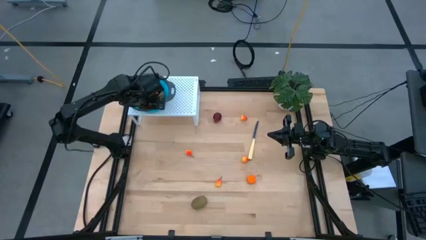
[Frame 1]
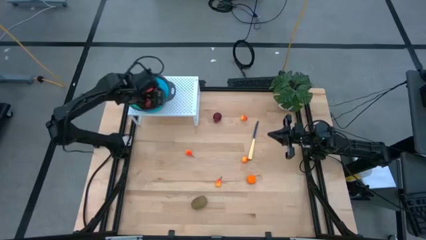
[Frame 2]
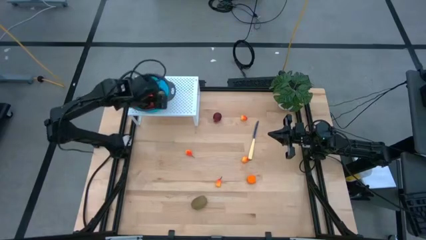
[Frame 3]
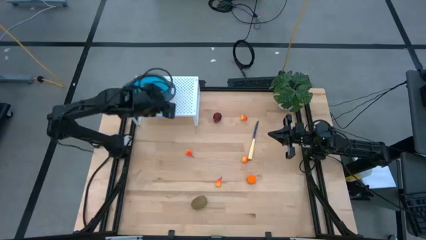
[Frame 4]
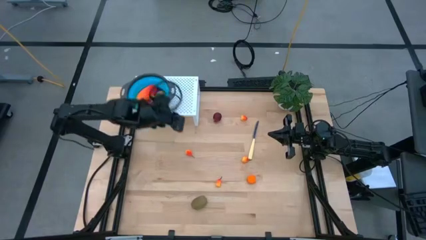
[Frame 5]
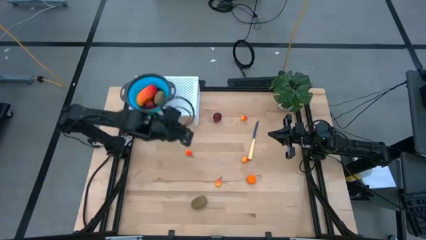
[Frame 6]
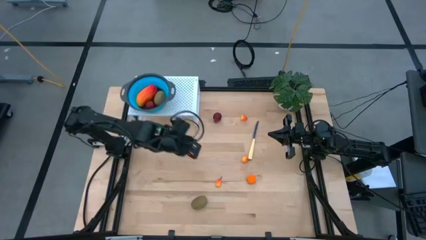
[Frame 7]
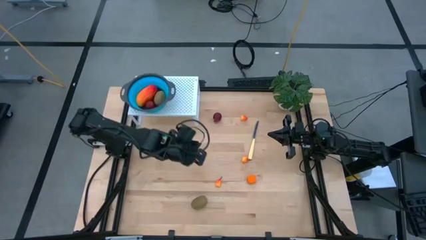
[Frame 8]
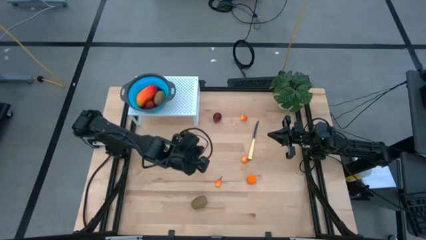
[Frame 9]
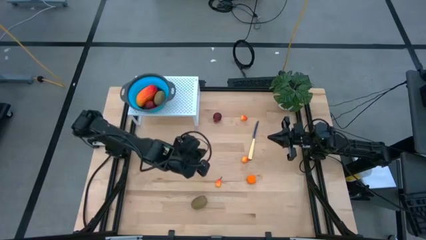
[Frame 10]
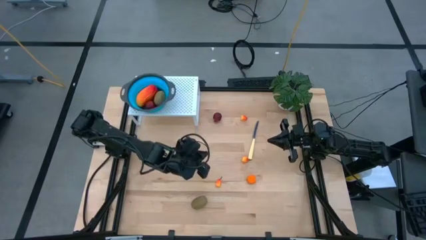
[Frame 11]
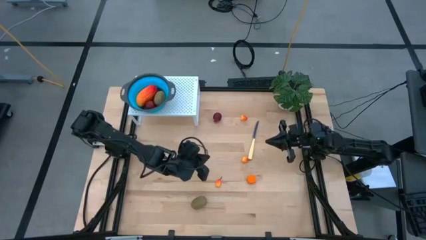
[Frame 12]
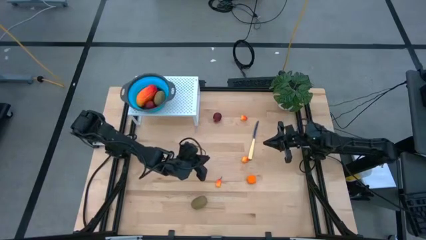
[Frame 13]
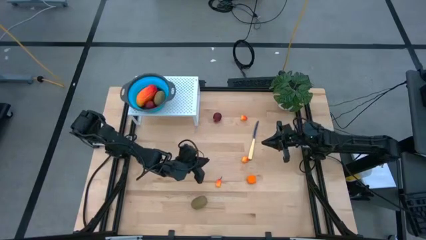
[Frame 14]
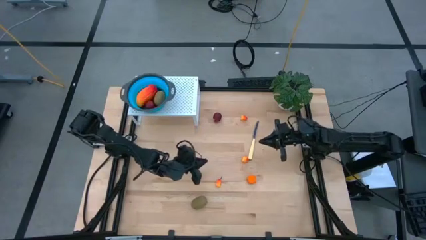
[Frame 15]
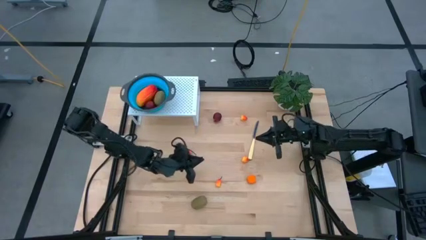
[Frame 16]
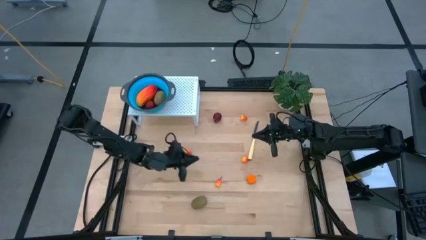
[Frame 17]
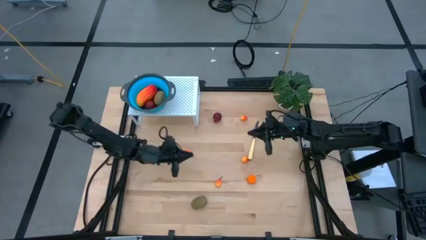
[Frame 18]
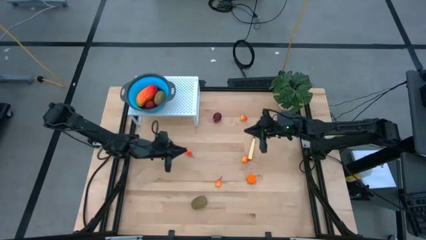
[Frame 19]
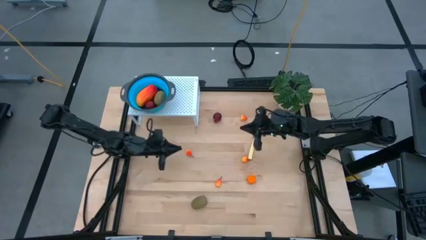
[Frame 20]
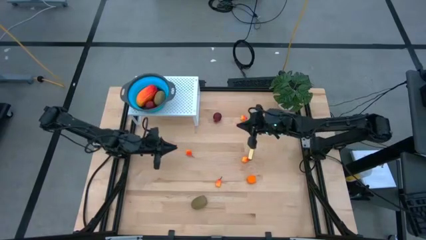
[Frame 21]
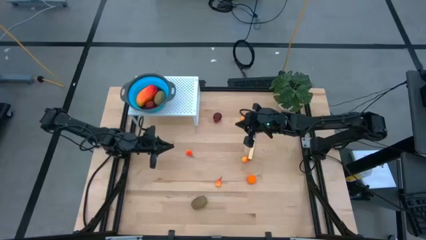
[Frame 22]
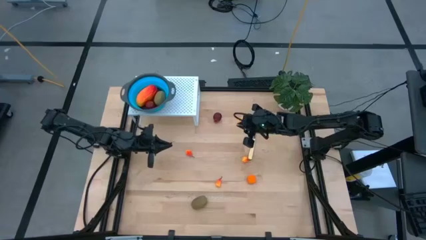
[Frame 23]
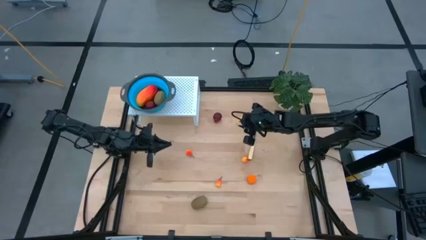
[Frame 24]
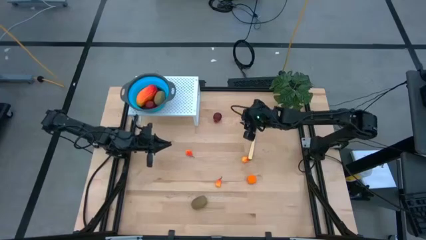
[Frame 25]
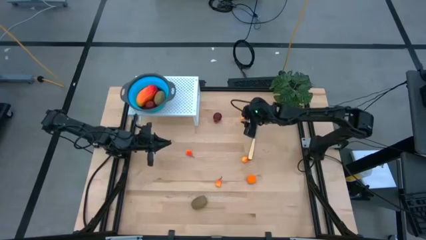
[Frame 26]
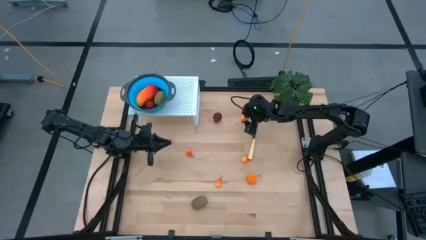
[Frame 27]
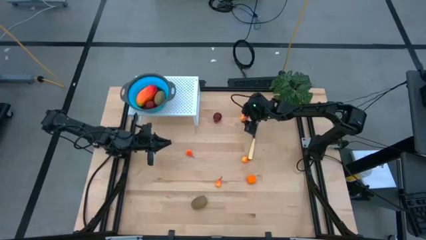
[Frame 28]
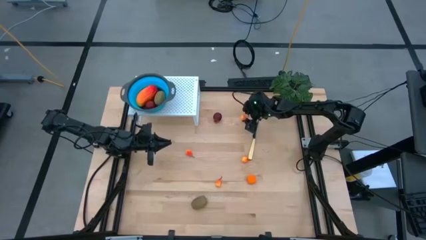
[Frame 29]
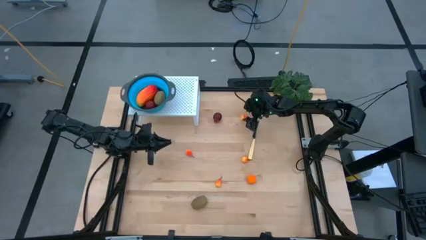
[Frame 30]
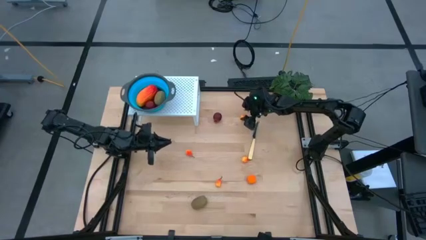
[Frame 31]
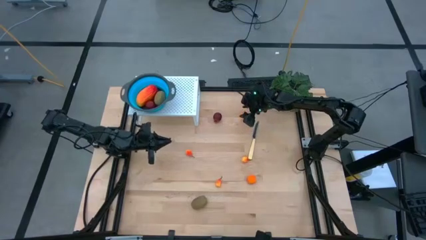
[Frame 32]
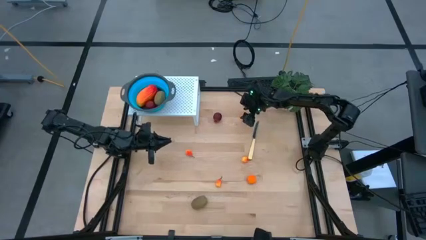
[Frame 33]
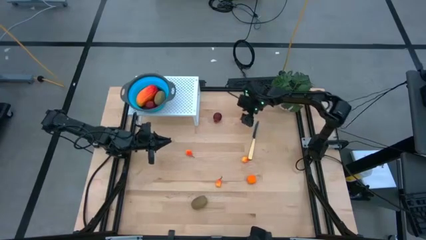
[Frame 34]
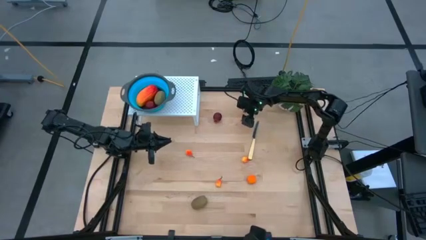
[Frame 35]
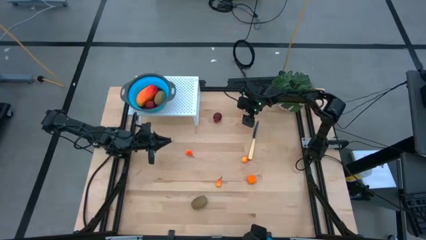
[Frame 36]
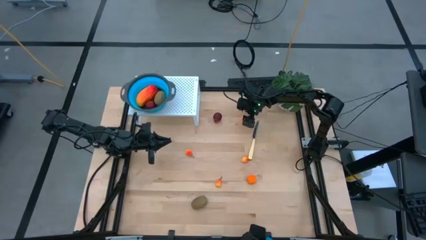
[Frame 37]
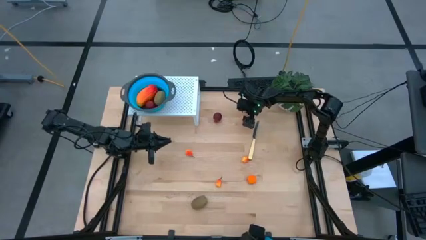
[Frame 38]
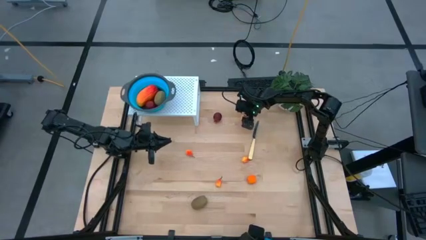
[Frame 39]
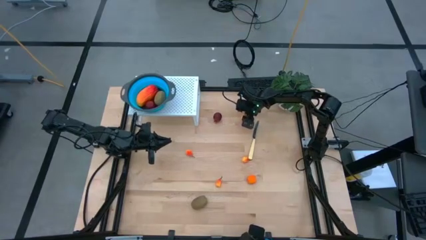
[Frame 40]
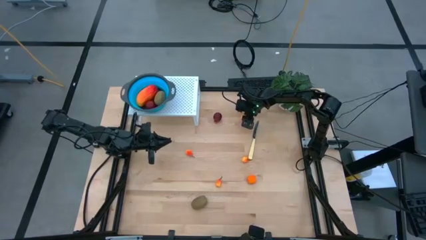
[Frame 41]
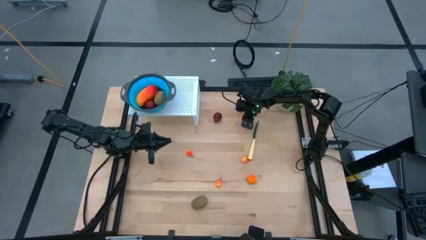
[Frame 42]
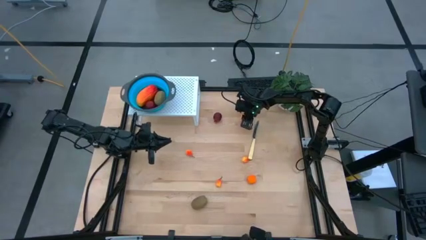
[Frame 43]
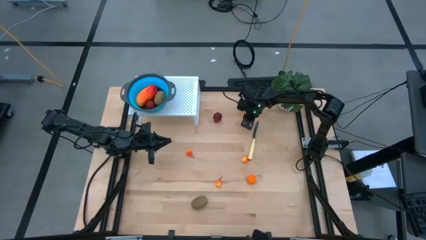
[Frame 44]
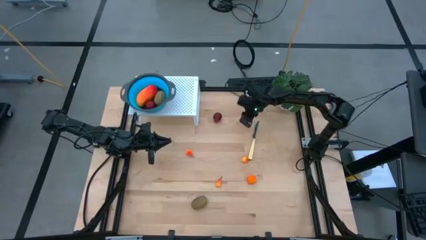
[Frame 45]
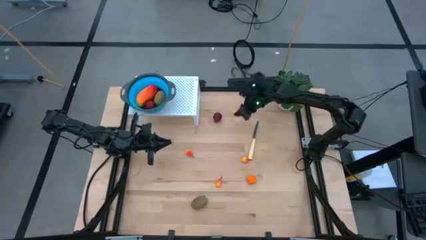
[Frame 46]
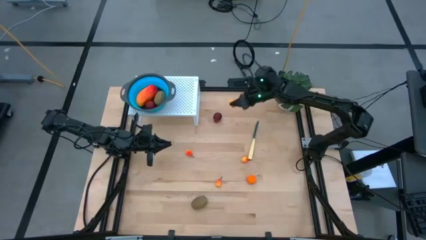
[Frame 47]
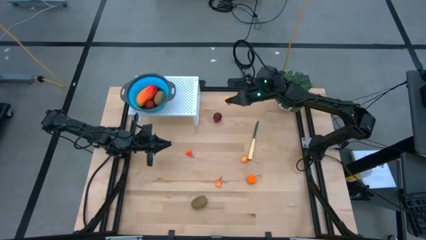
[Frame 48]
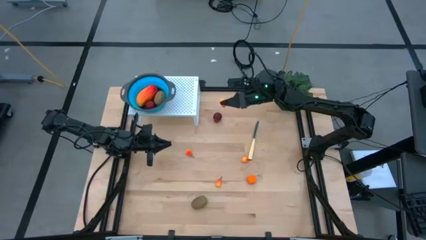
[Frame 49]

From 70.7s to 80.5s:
Task: Pick & Place Fruit
Put the orange peach into the blue strainer bowl on the shelf

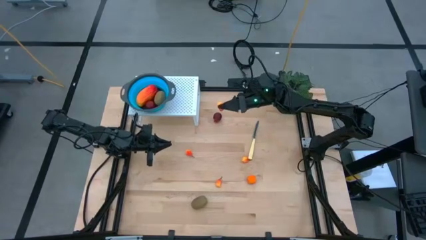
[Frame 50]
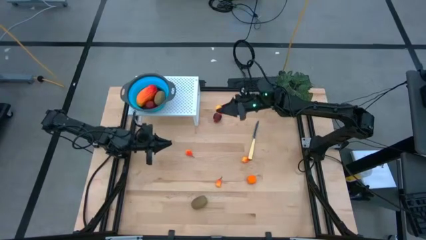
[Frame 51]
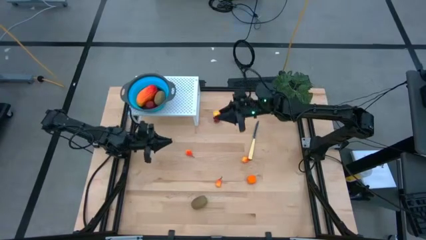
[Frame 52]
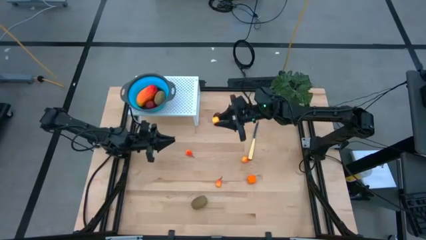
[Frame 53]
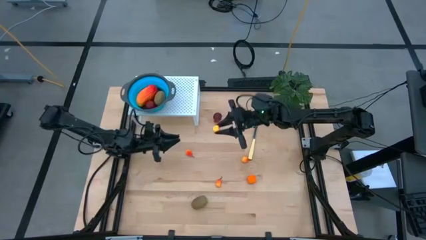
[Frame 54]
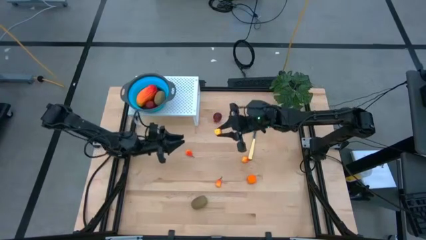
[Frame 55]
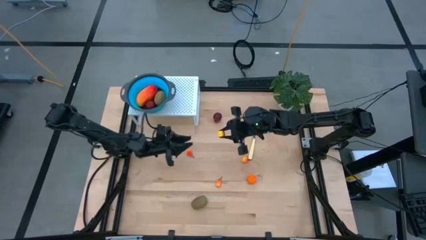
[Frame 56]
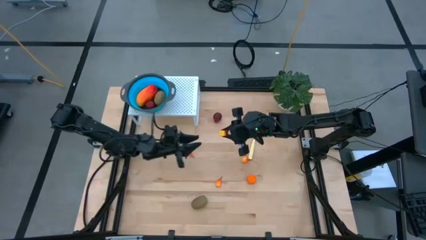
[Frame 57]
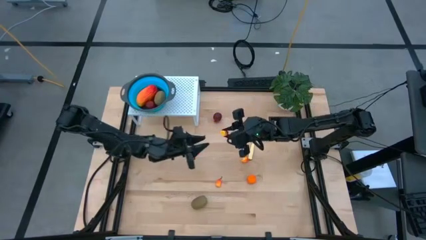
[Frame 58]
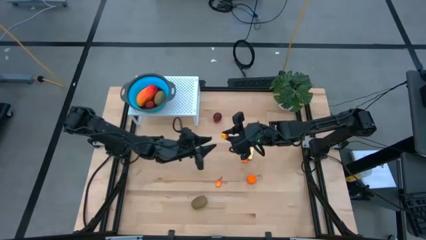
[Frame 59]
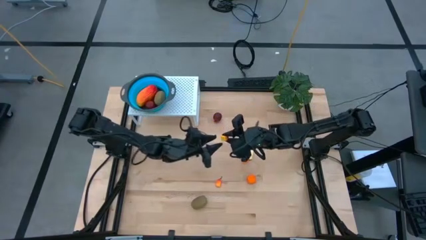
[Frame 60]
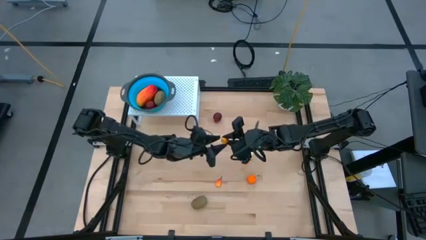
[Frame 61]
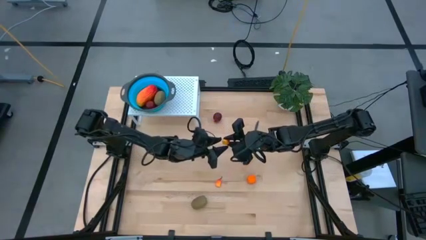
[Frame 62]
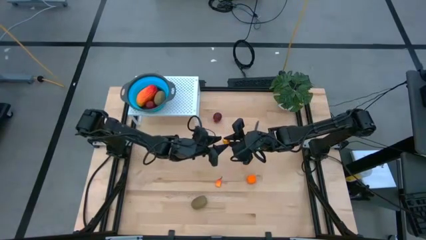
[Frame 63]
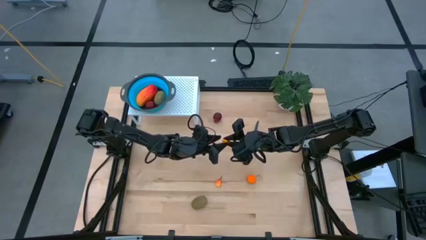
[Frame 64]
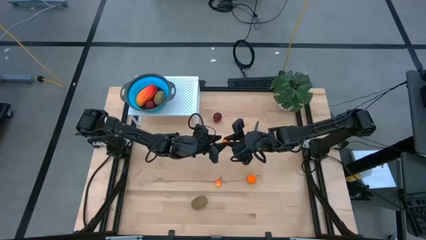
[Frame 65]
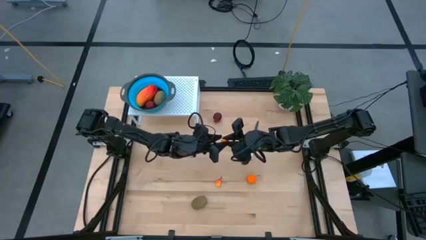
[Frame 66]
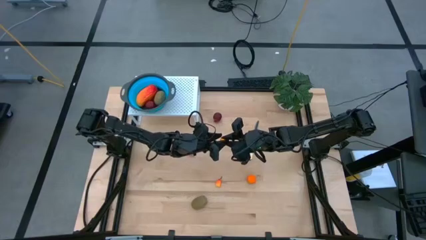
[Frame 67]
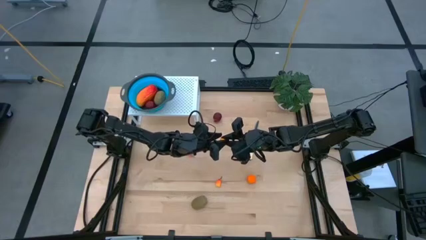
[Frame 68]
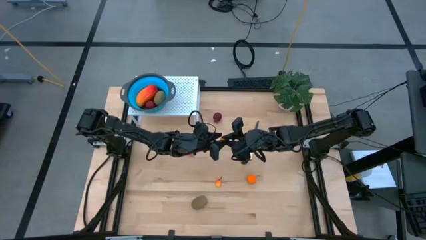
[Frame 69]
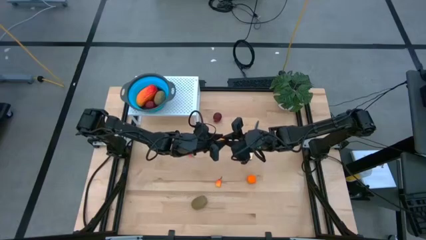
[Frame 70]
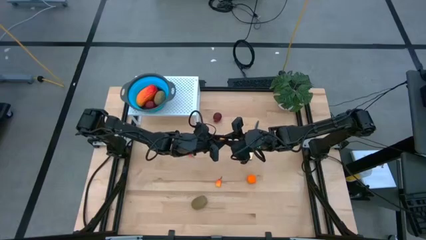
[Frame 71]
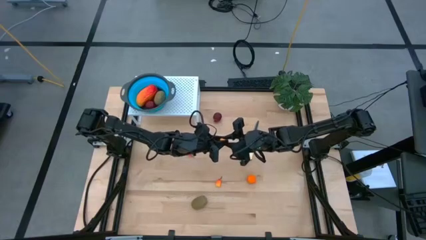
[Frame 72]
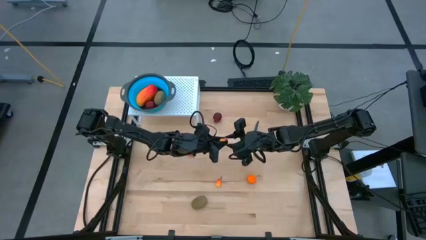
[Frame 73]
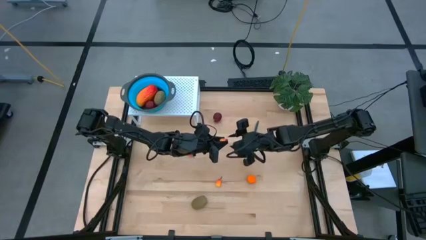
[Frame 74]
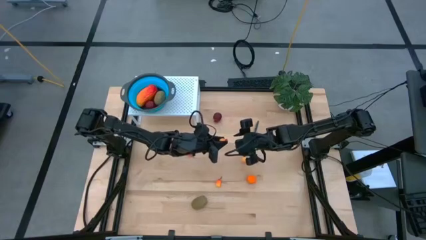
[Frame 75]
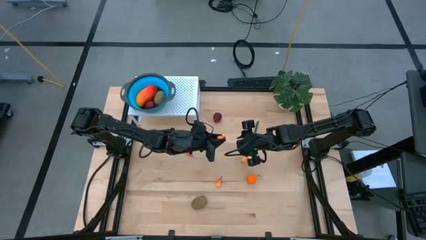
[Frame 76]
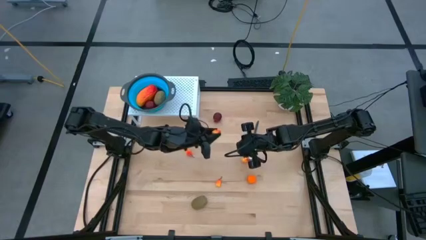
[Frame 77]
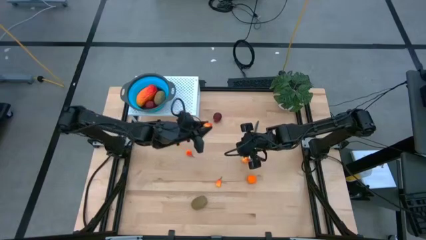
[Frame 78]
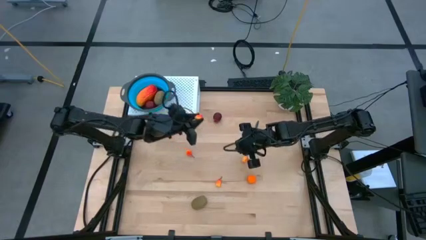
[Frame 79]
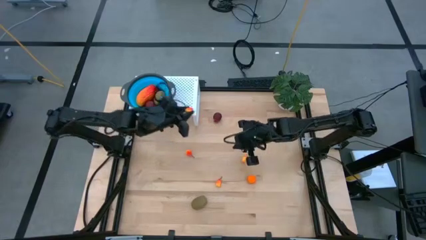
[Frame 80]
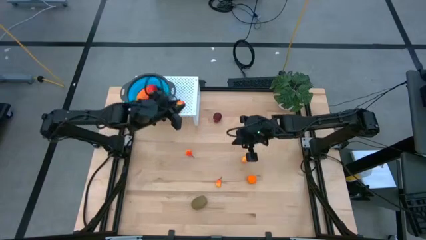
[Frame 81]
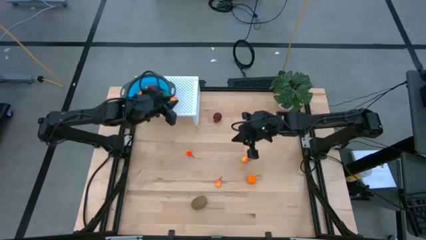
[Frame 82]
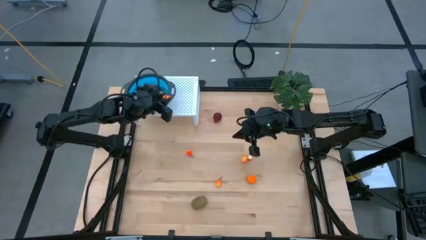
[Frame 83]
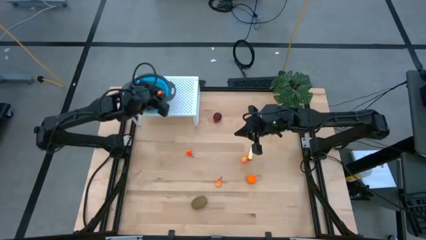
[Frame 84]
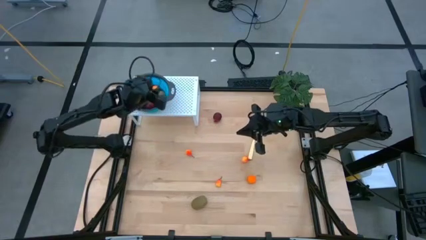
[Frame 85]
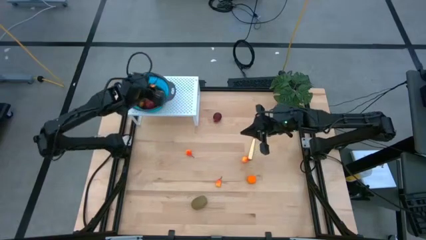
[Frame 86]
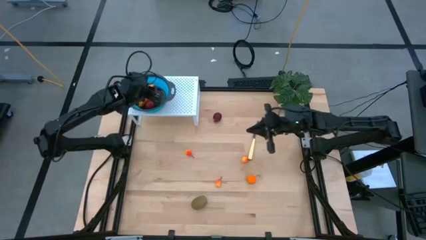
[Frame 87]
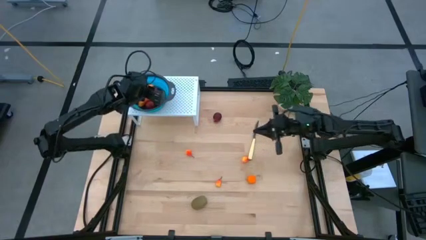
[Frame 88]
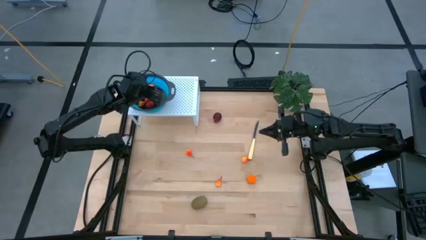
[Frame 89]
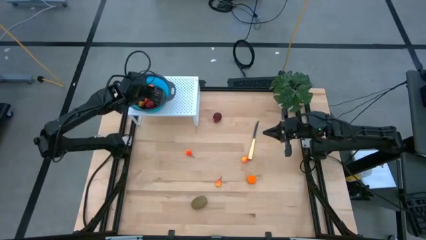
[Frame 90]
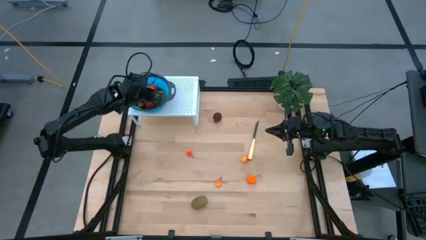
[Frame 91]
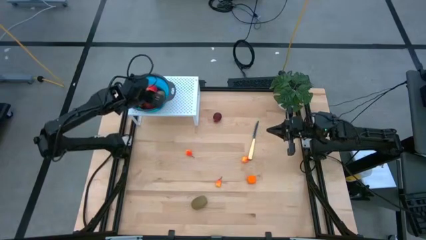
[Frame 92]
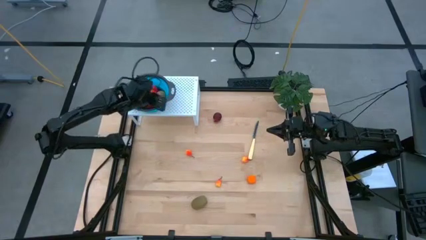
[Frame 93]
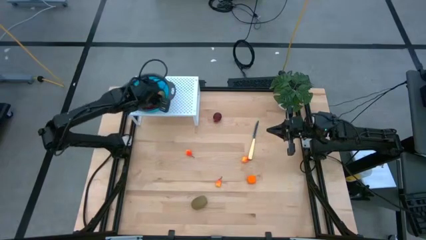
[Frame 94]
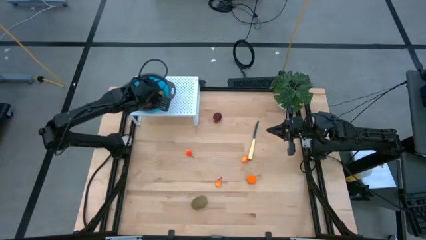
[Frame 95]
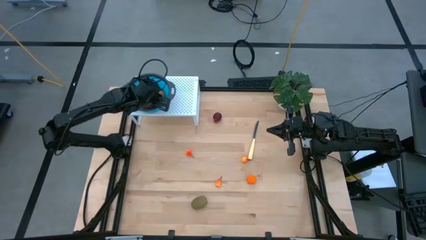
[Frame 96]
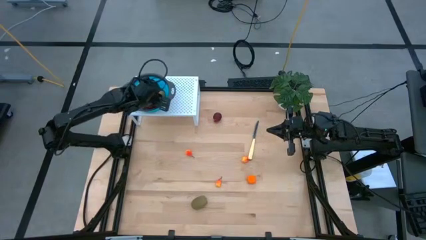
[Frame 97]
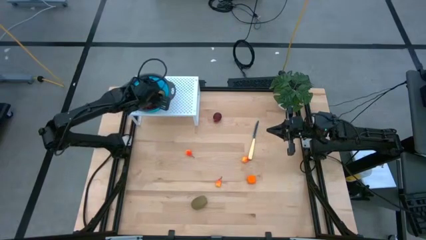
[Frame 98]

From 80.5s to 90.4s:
Put the orange peach into the blue strainer bowl on the shelf
